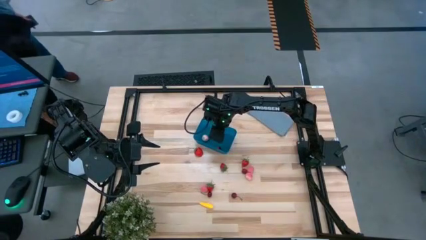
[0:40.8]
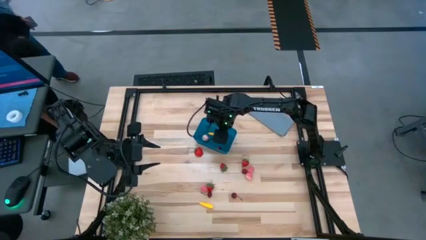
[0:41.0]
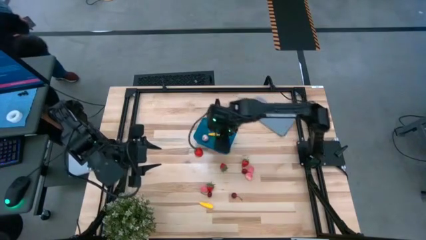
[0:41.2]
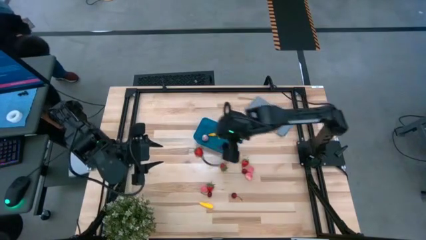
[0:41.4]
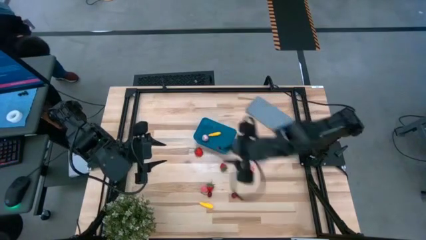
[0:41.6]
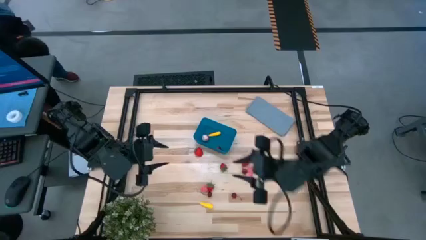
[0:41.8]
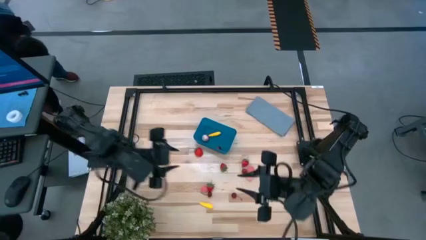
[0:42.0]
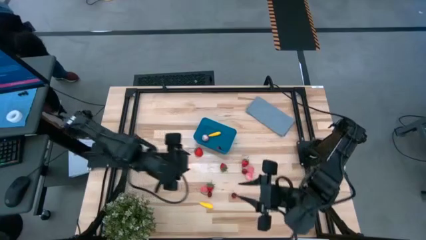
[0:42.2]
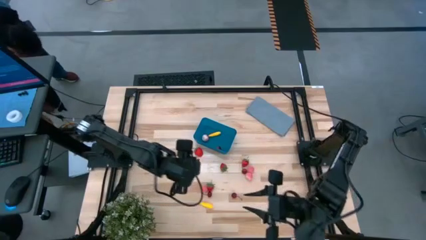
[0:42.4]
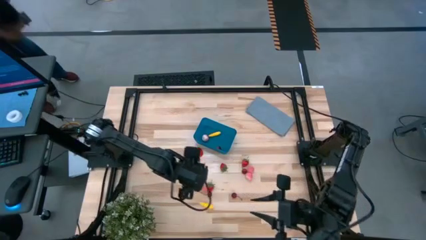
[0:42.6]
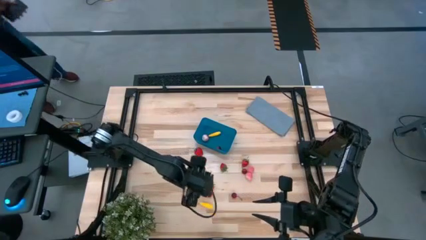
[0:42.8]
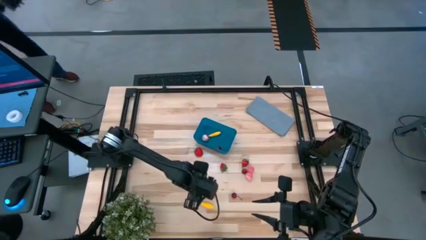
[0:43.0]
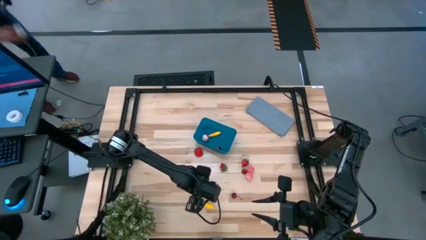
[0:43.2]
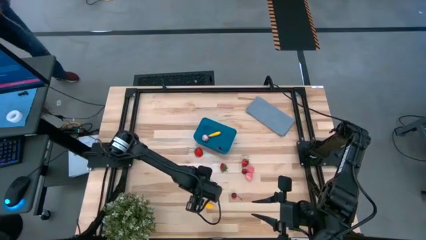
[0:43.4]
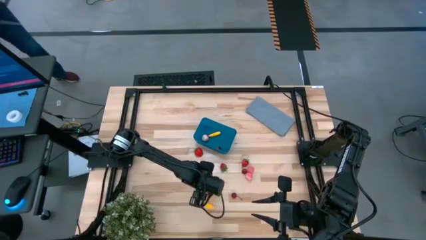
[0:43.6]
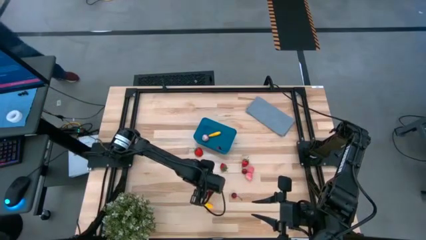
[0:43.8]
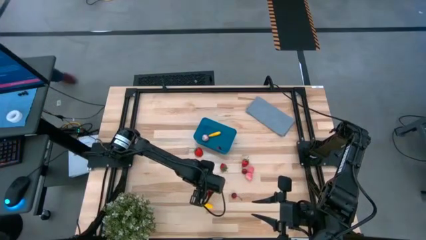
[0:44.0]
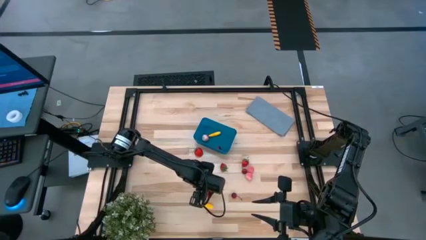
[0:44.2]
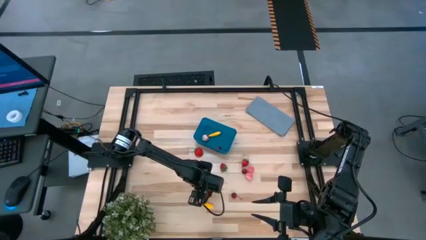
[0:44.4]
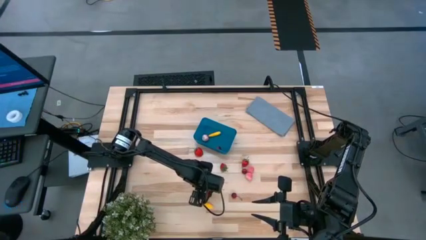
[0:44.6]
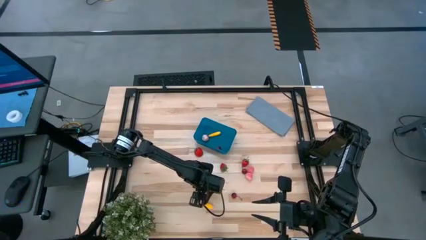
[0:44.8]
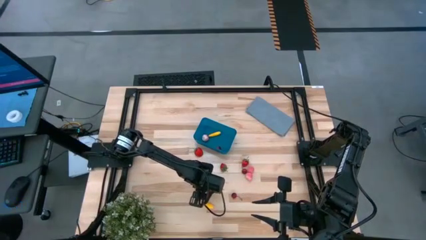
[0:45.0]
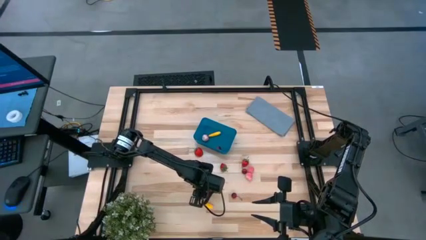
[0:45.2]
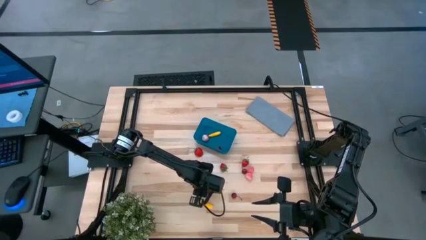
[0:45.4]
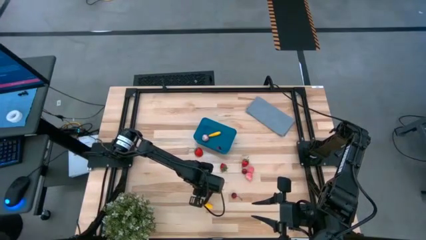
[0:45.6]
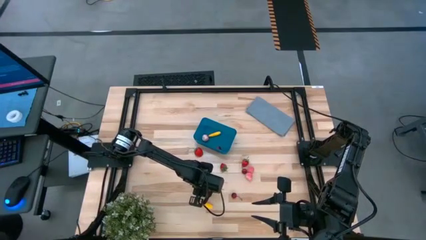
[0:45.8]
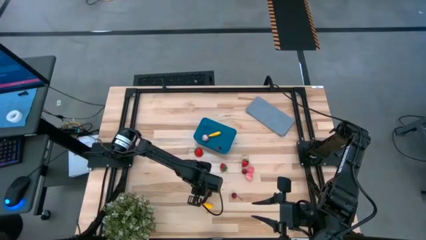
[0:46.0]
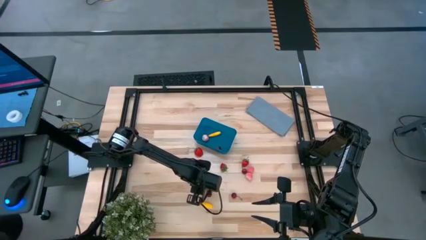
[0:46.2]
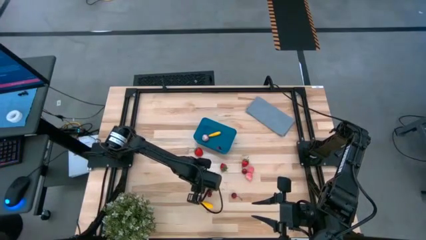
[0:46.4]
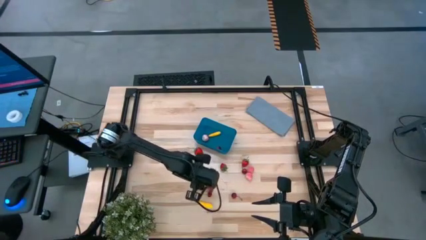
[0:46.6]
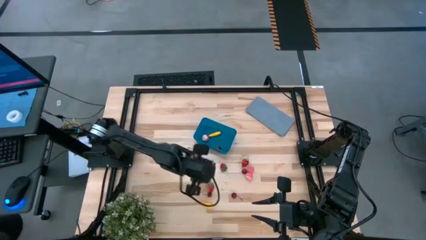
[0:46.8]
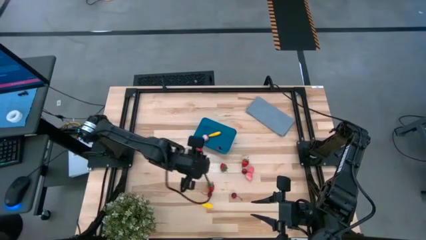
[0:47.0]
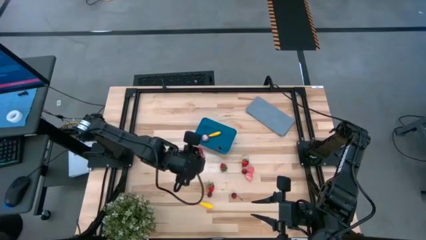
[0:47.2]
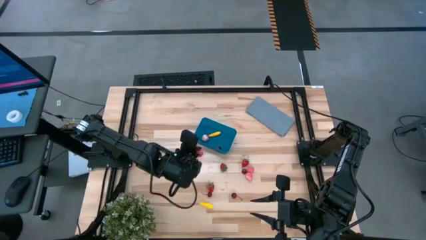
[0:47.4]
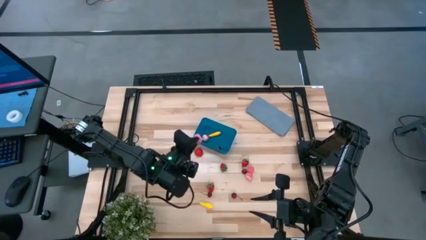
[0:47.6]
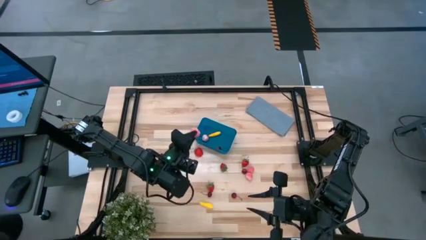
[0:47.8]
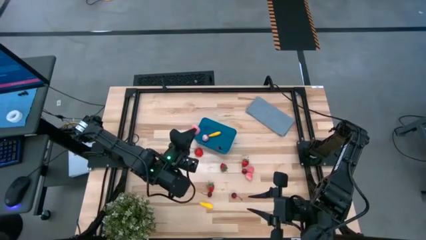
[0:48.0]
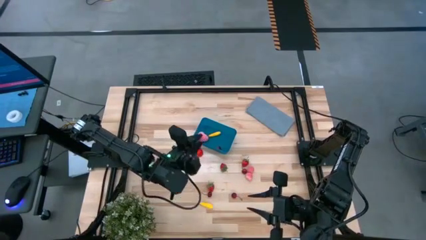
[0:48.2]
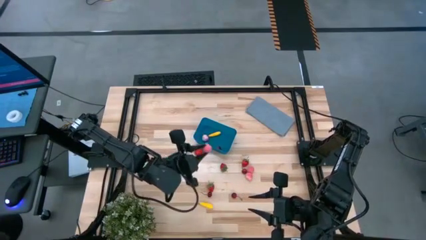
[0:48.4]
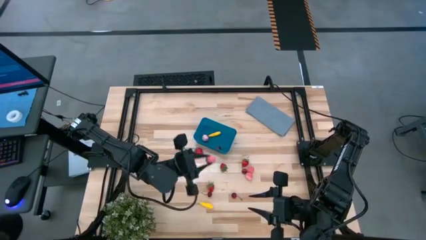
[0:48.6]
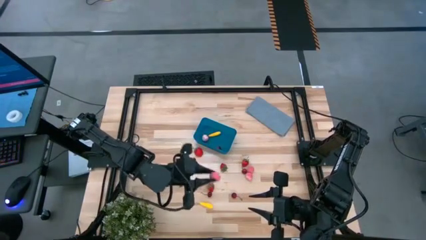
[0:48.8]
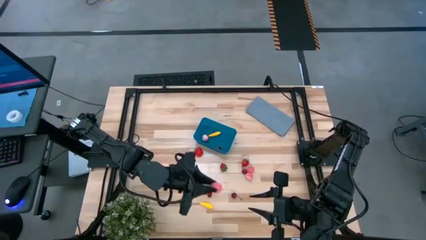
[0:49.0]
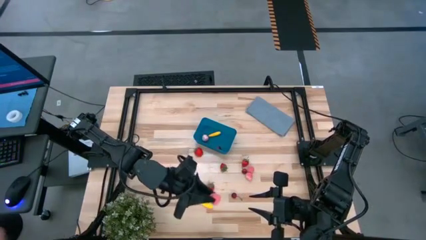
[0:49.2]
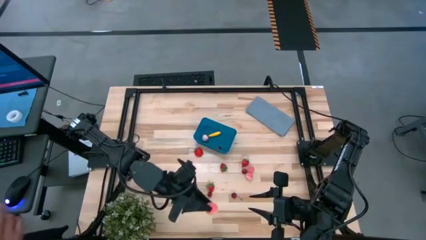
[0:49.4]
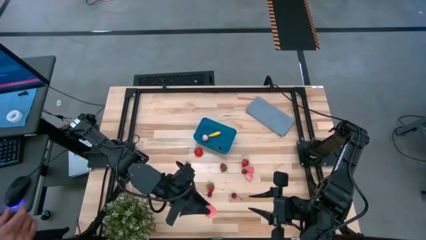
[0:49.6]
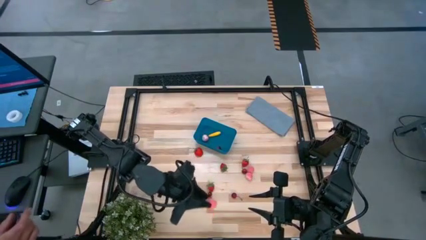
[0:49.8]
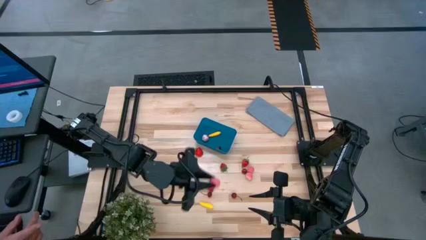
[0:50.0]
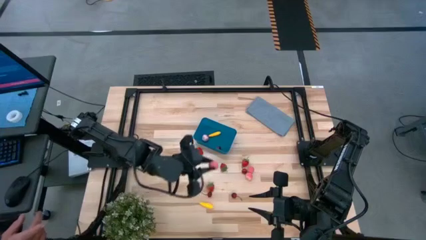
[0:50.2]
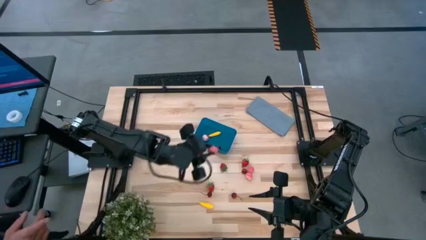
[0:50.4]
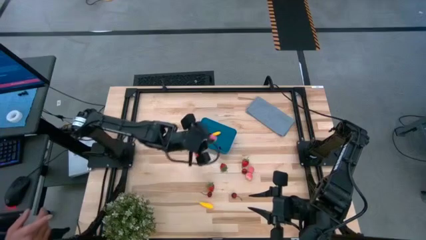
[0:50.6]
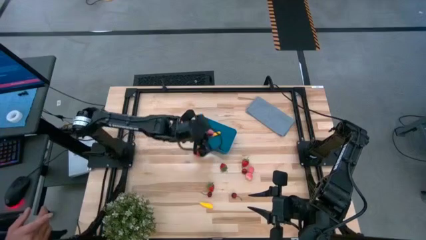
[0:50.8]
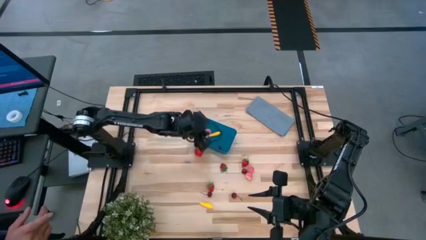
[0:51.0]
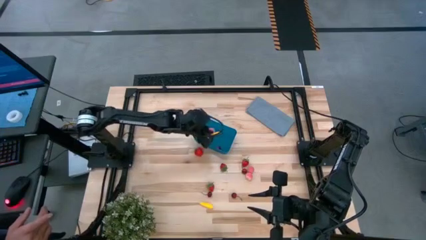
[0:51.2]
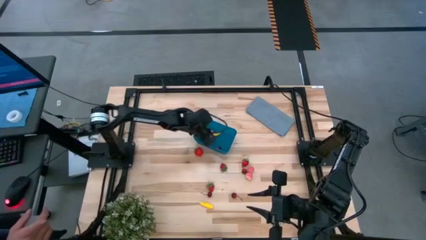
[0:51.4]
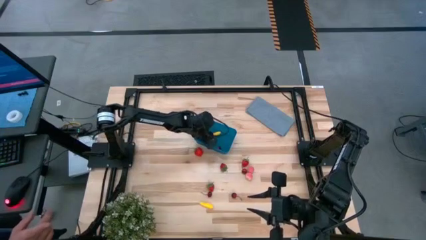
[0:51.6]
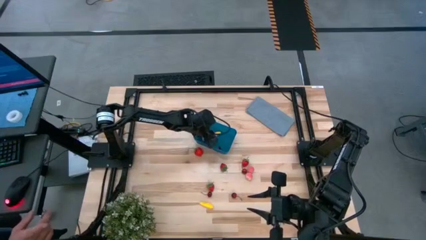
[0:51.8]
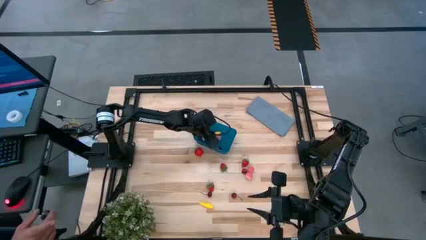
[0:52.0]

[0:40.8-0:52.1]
Task: Pick and placing Produce into tupperware
Put the peach into the blue bin
